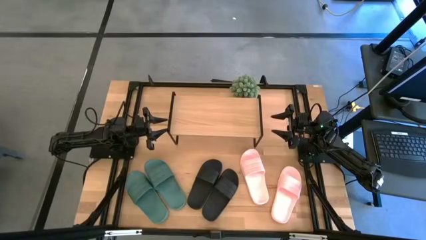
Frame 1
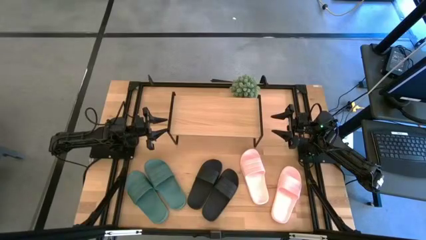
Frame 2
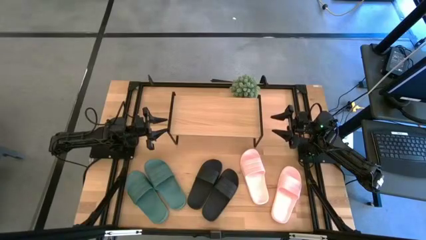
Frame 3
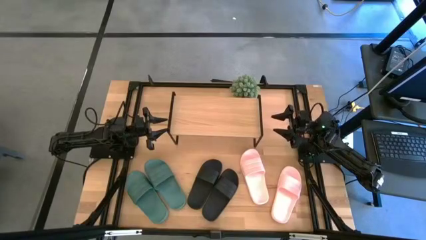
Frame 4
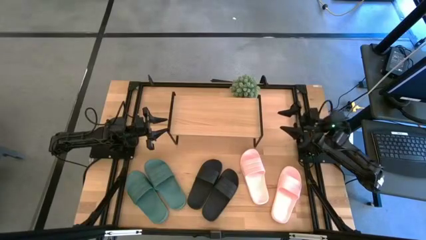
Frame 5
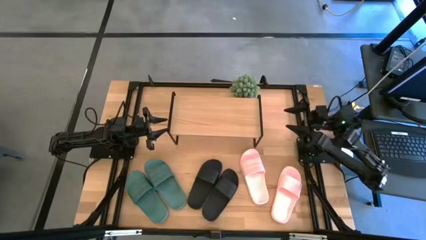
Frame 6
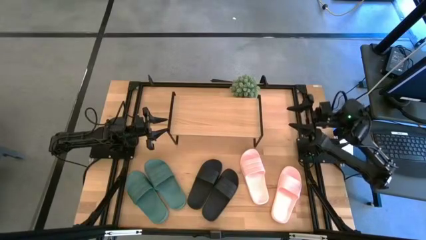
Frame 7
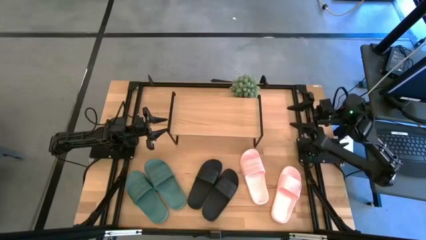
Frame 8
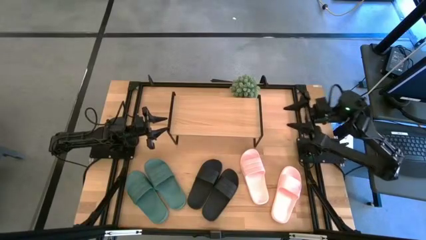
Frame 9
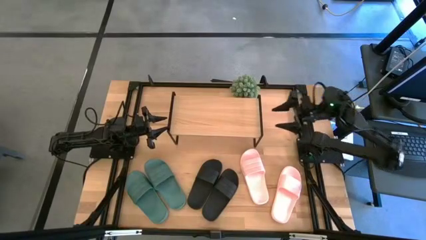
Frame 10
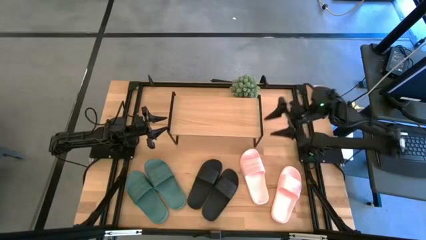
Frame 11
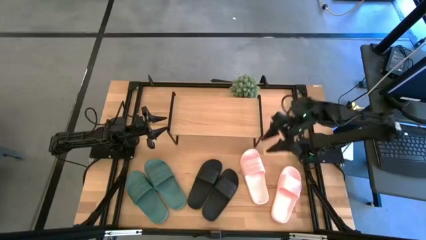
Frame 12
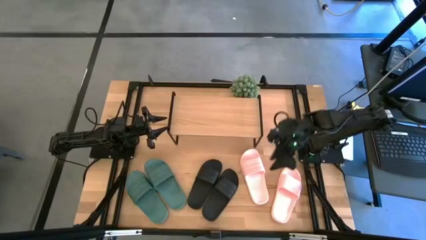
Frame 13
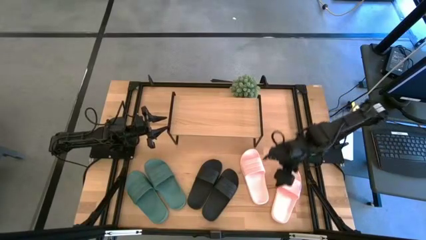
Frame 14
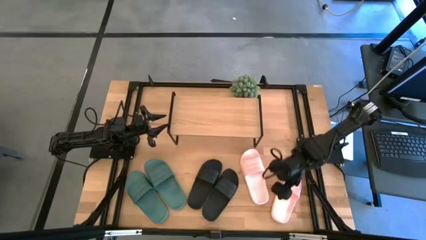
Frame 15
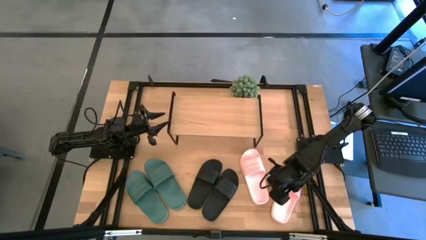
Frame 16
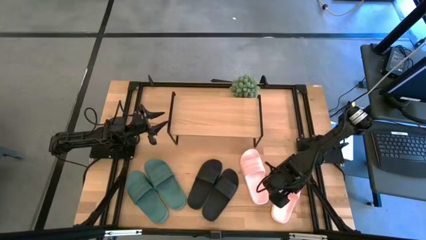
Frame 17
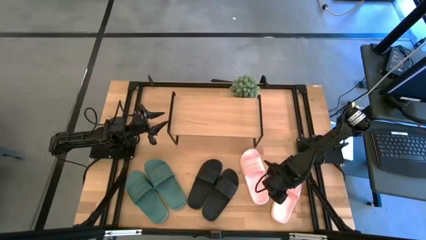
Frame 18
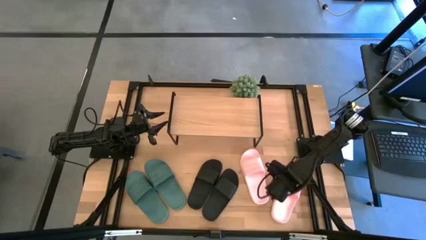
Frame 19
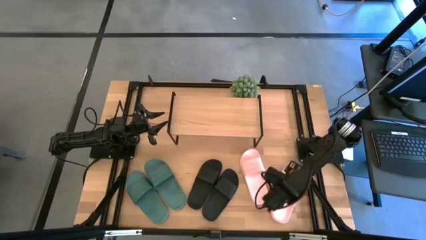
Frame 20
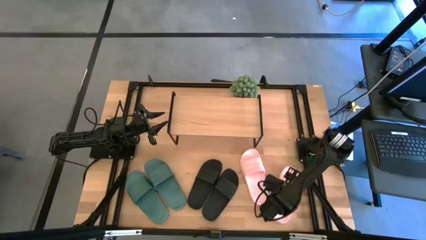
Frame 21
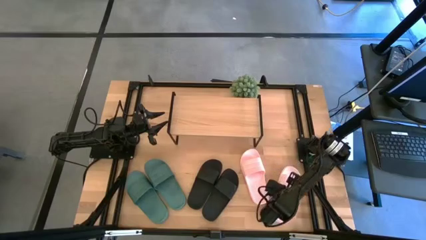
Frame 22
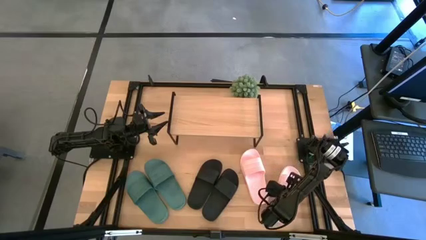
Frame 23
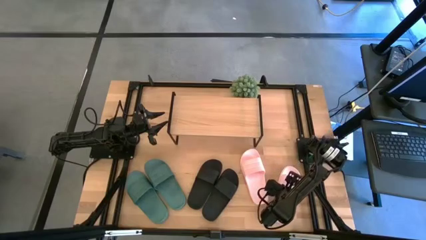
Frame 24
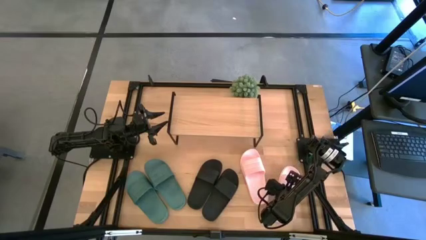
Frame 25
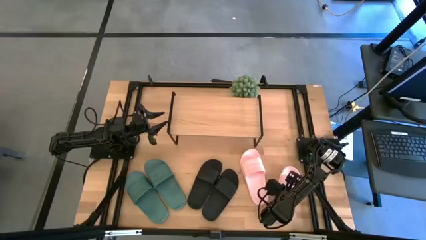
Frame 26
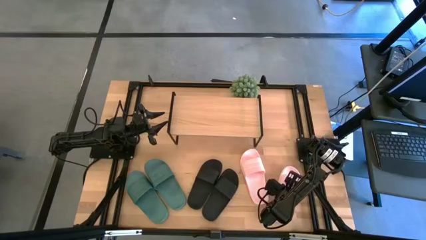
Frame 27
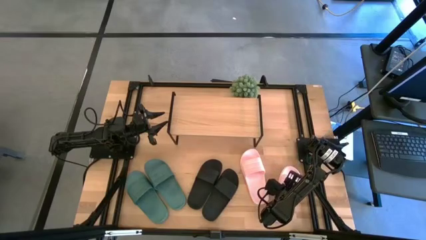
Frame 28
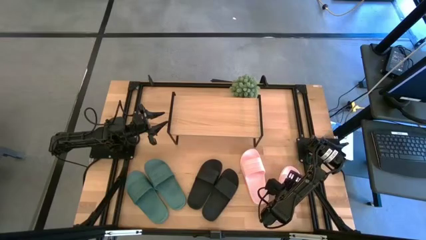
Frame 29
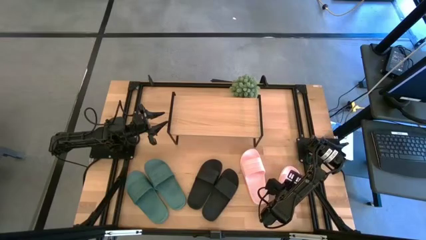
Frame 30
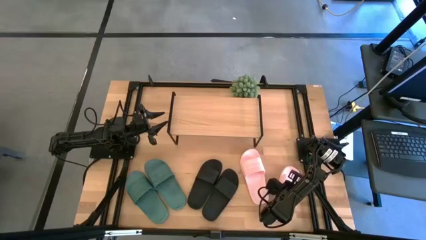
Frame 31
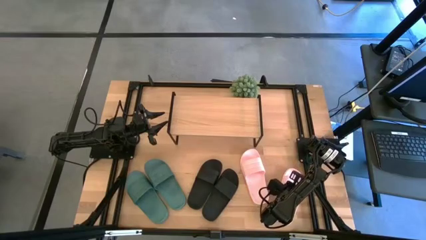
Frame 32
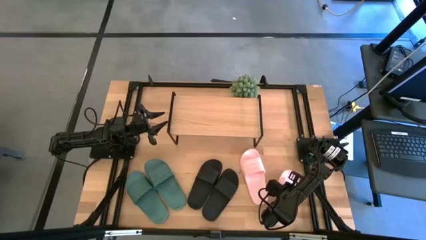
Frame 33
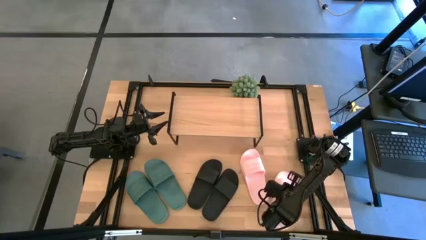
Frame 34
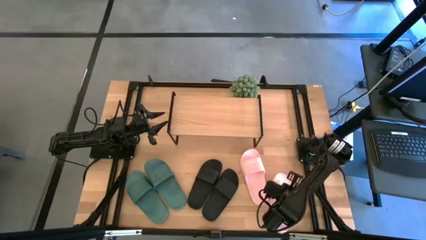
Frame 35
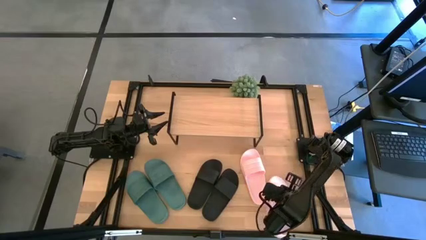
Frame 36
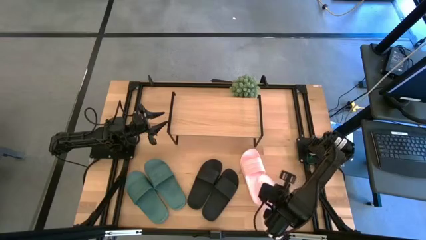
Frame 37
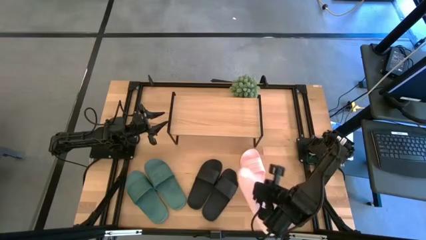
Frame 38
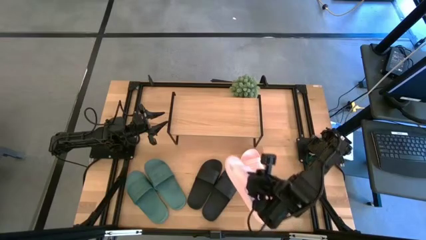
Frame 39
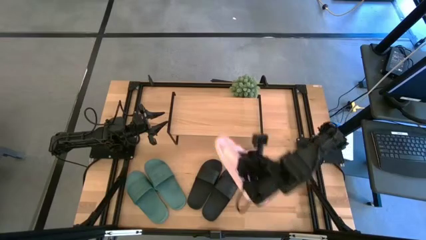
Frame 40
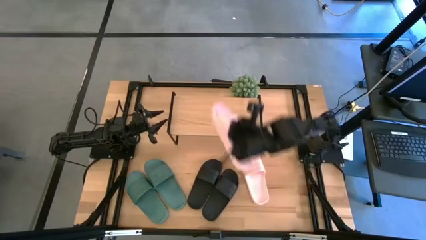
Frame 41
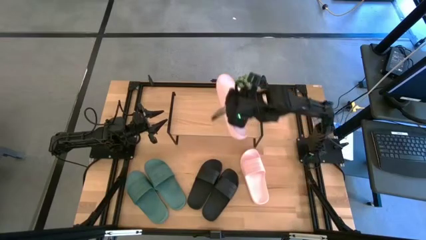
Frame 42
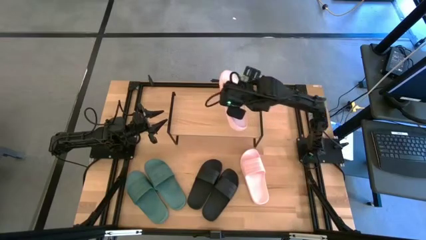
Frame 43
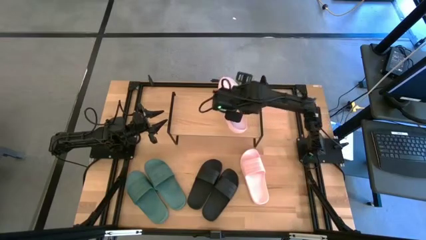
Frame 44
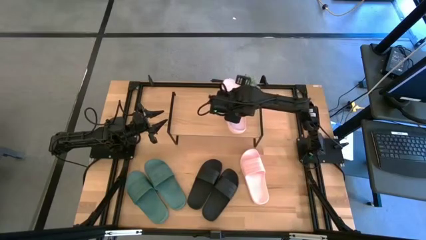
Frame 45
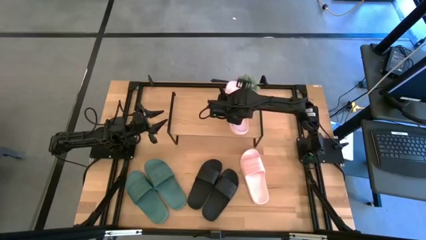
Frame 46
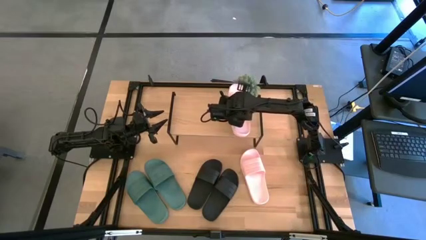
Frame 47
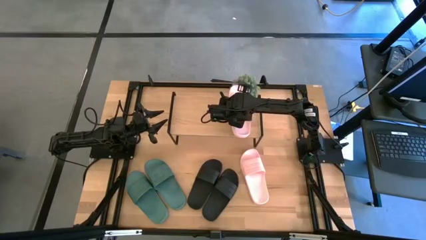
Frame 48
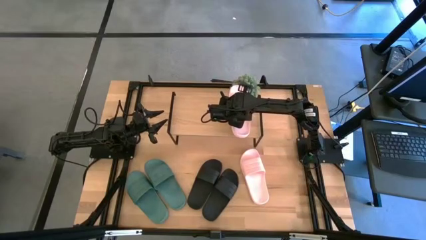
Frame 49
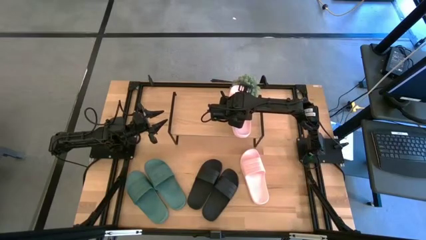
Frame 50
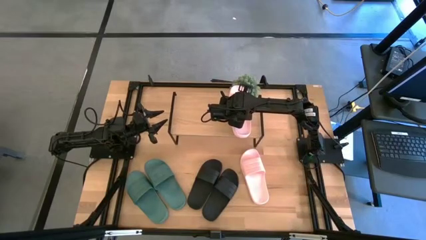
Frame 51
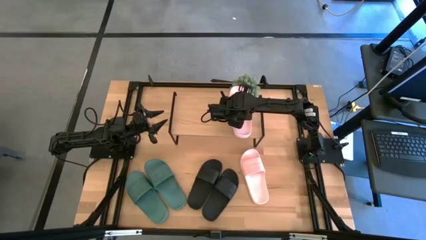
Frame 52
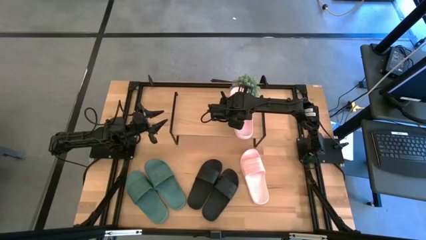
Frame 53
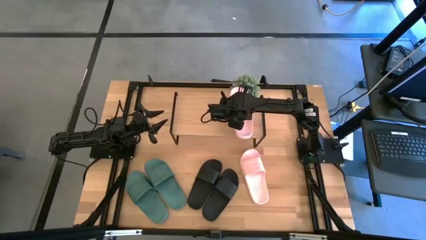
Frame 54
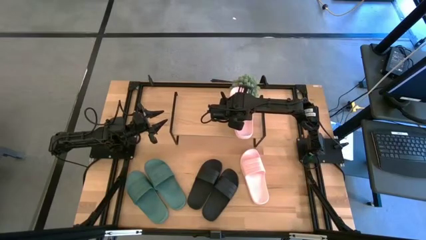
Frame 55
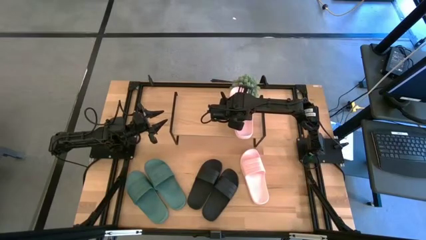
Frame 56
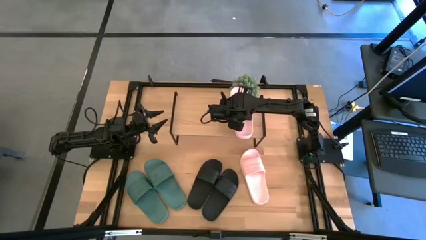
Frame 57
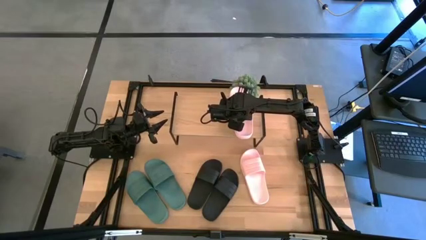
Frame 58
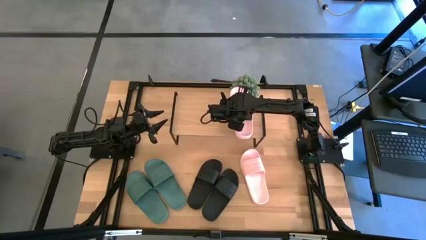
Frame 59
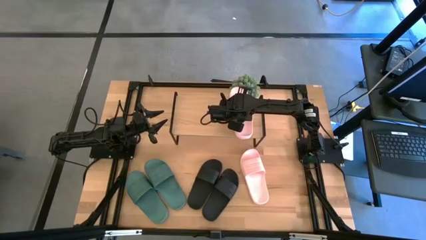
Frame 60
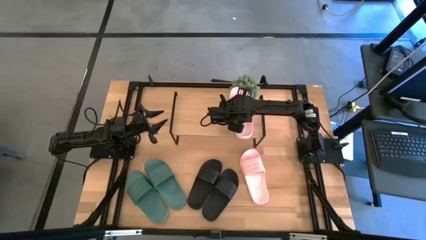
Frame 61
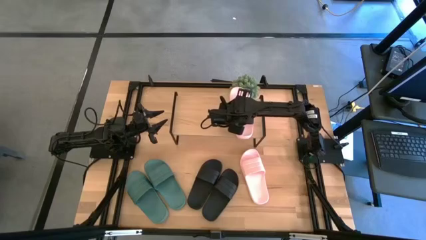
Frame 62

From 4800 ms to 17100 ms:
Task: Pick and place slides into the shelf
Put the right pink slide on the shelf
